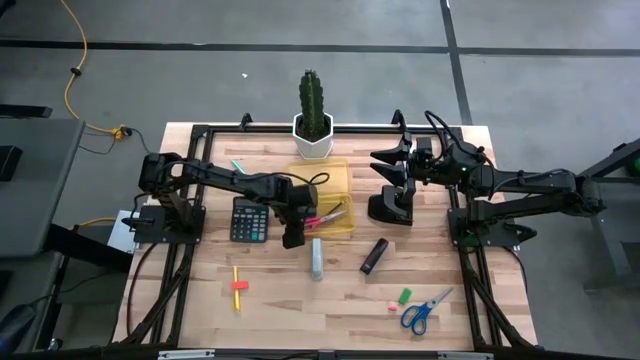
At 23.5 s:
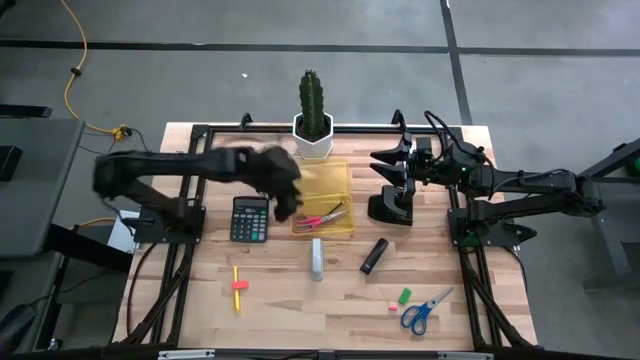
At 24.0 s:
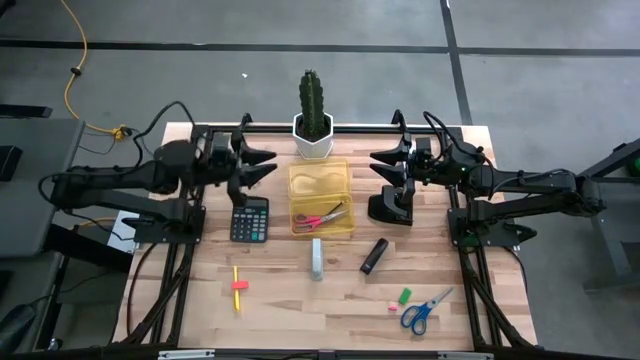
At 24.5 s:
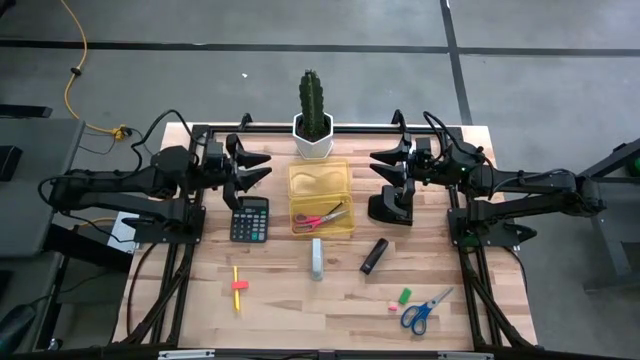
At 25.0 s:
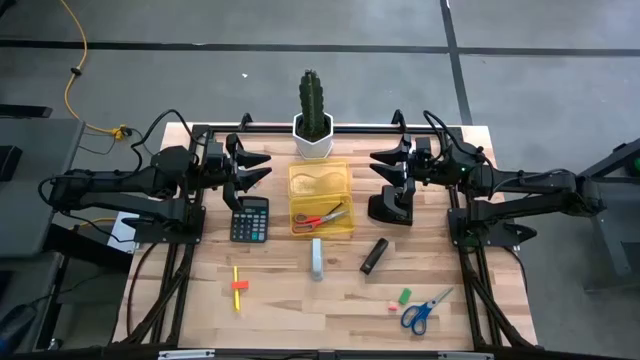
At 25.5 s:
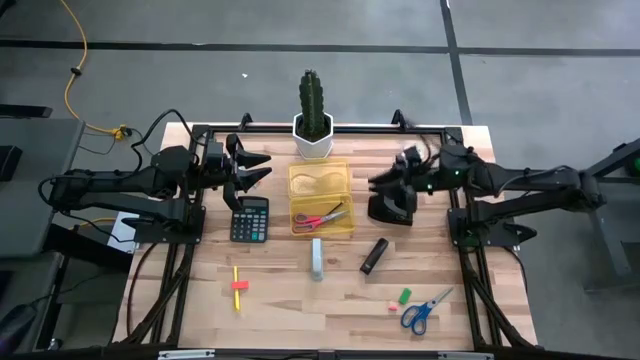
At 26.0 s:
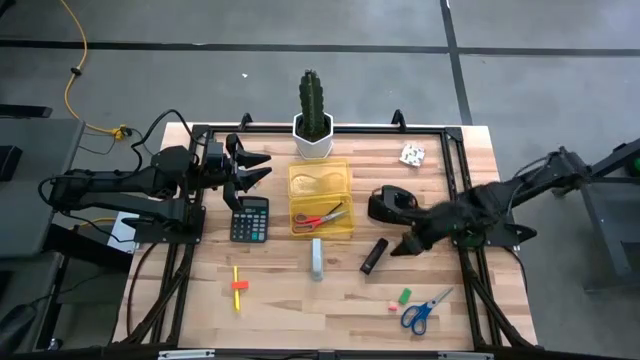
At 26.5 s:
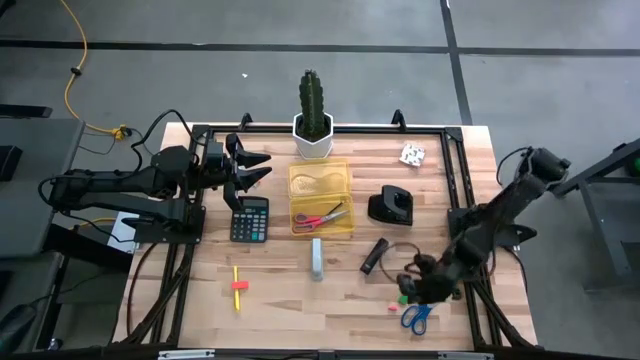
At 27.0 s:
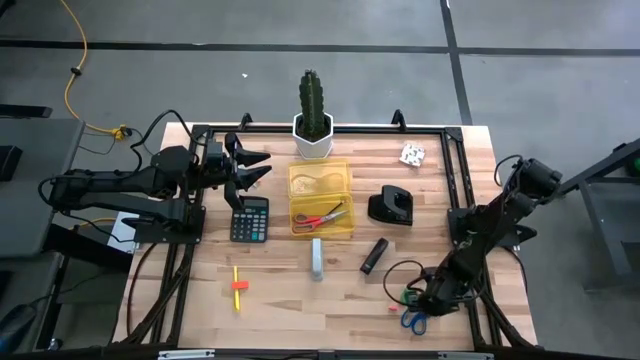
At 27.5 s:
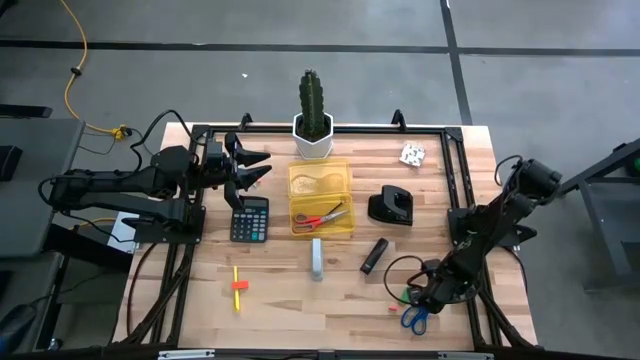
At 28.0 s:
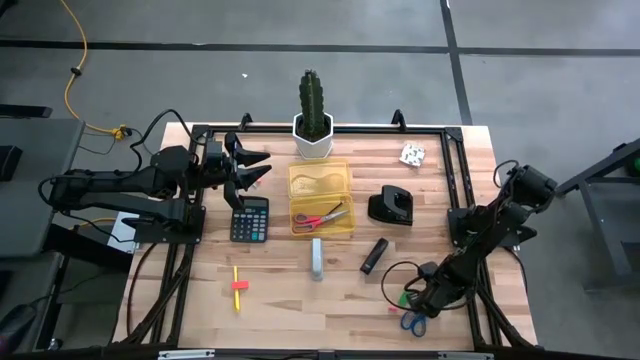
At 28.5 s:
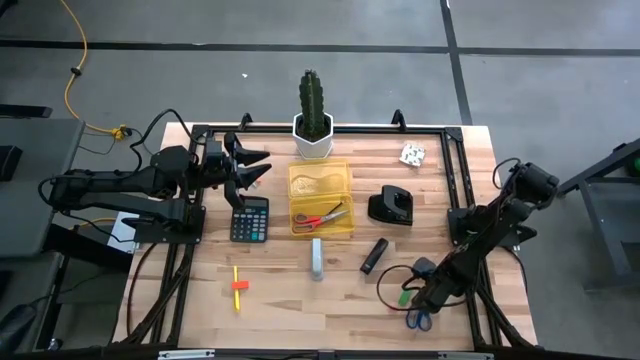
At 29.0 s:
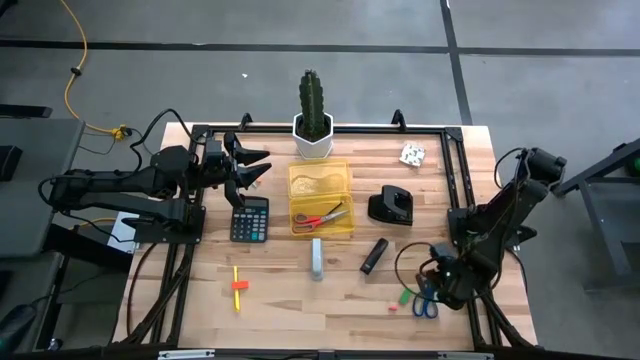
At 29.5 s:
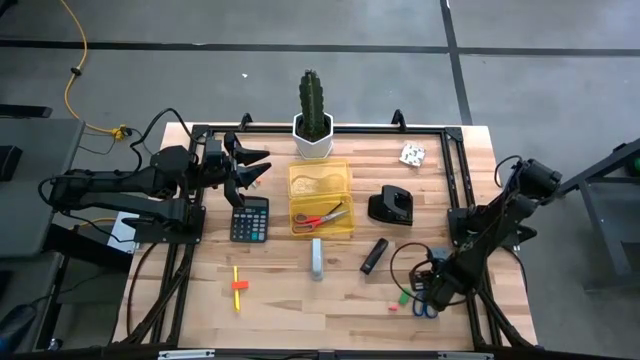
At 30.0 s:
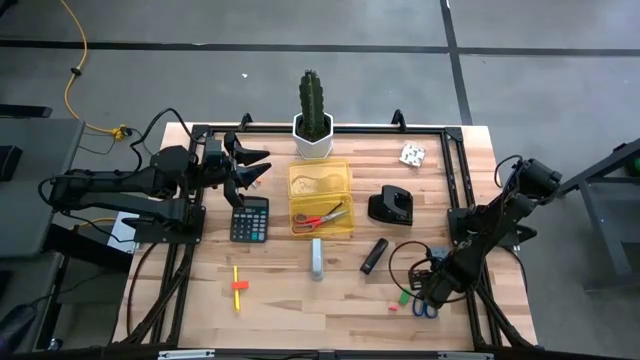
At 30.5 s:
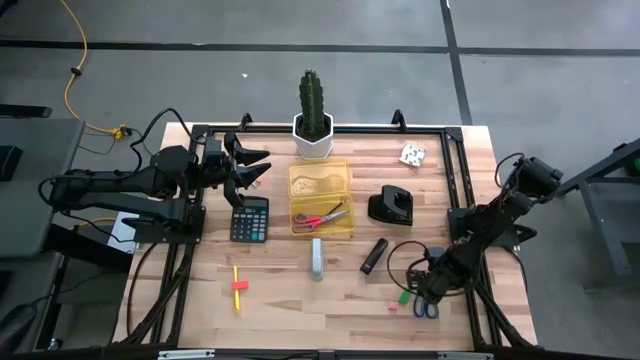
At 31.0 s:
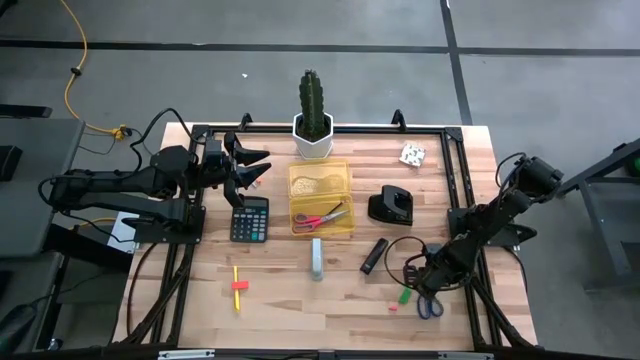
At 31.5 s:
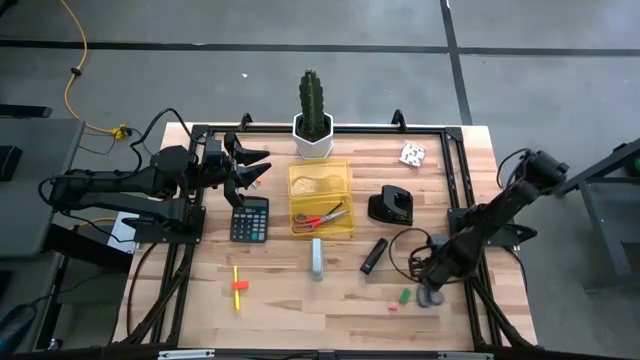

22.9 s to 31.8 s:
Task: Pick & place school supplies into a supply box
Put the blue scissors into the yellow supply box

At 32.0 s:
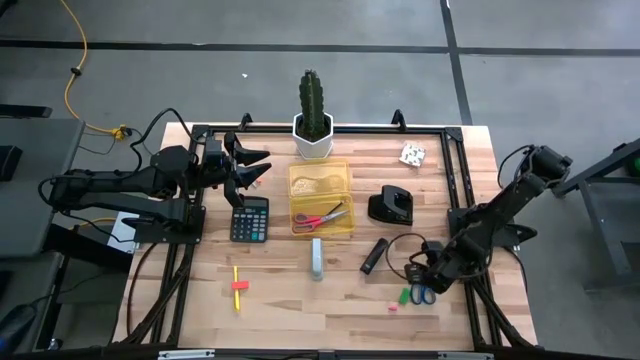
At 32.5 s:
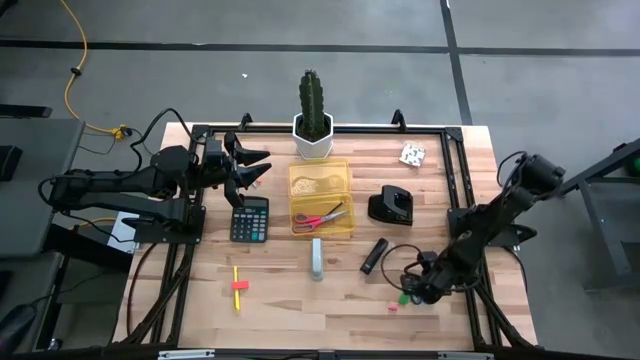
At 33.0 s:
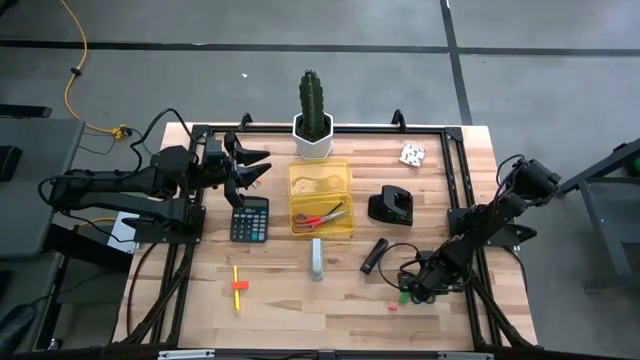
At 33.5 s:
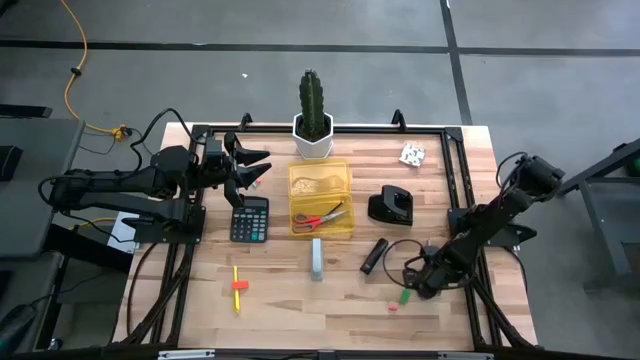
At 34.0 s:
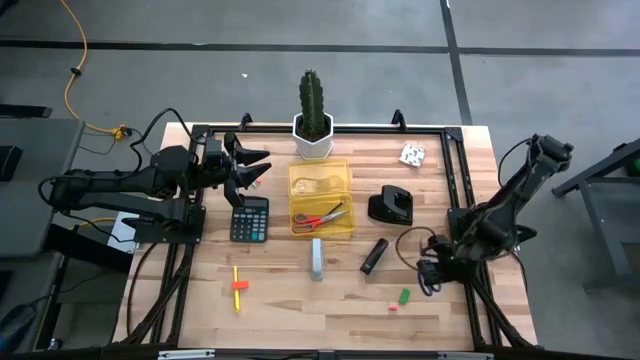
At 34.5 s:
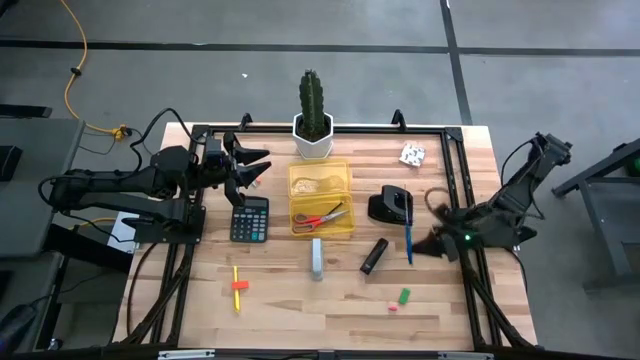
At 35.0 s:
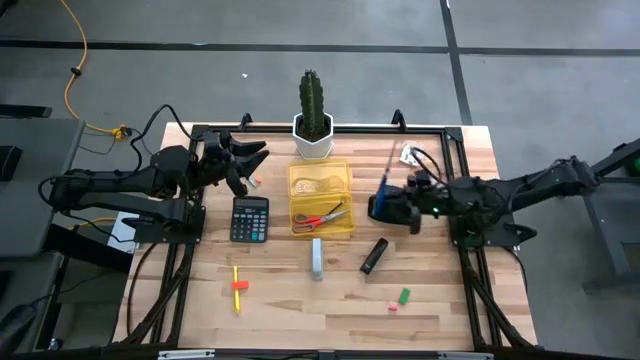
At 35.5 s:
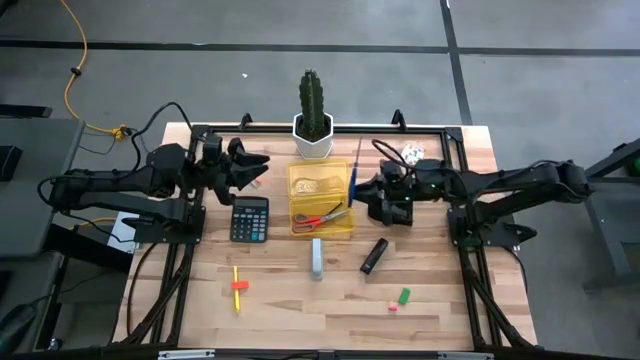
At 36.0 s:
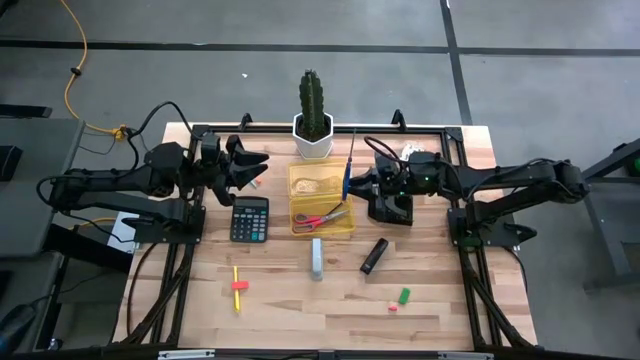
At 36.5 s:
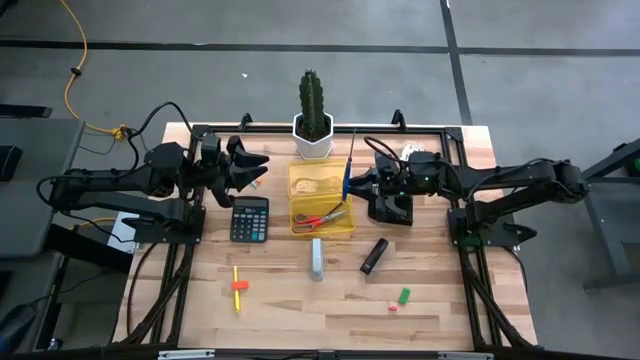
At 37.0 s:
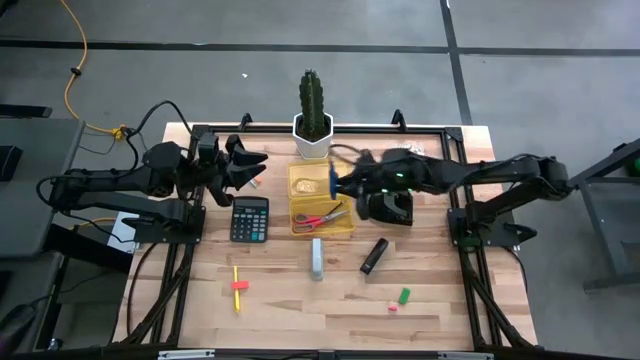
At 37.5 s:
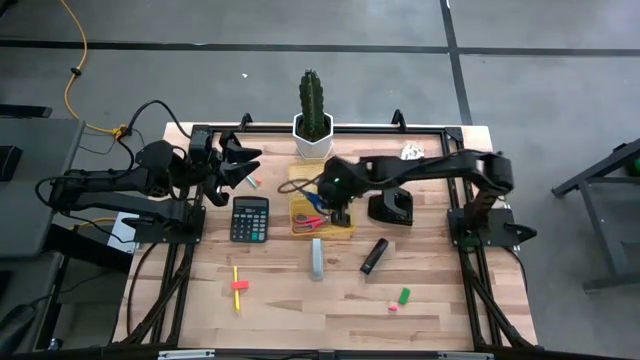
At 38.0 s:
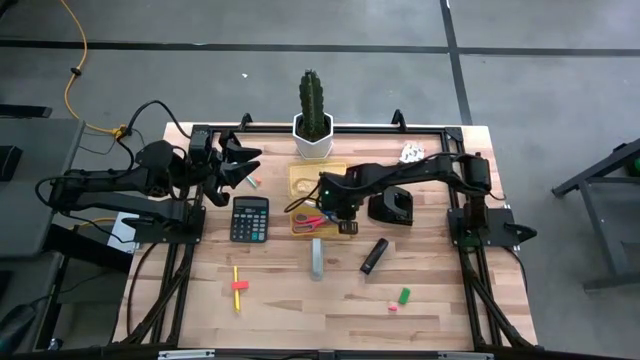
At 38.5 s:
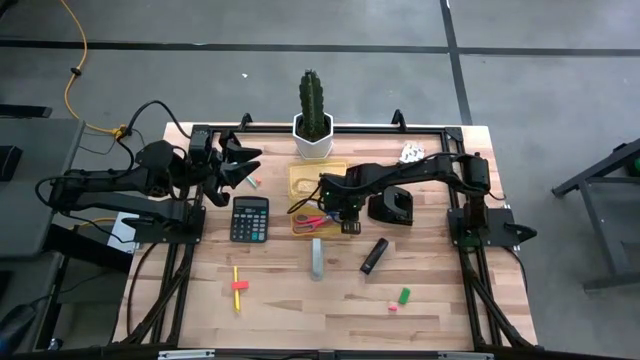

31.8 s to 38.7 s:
Put the blue scissors into the yellow supply box

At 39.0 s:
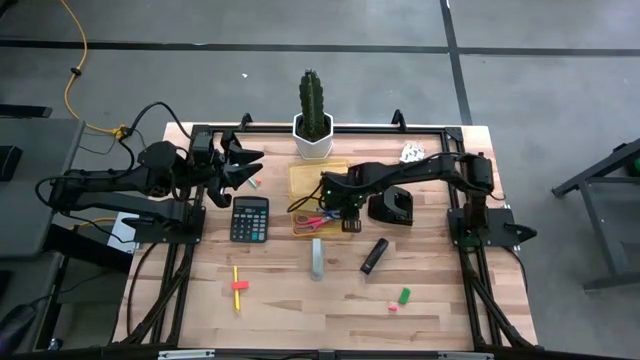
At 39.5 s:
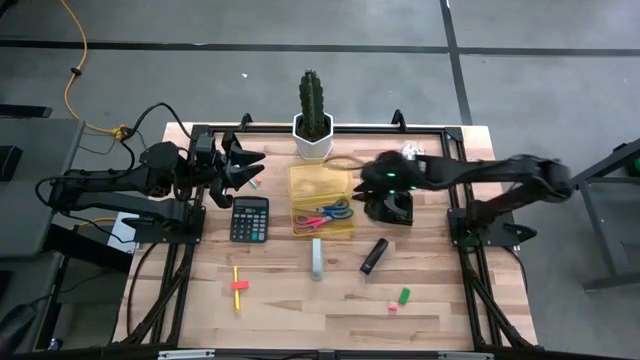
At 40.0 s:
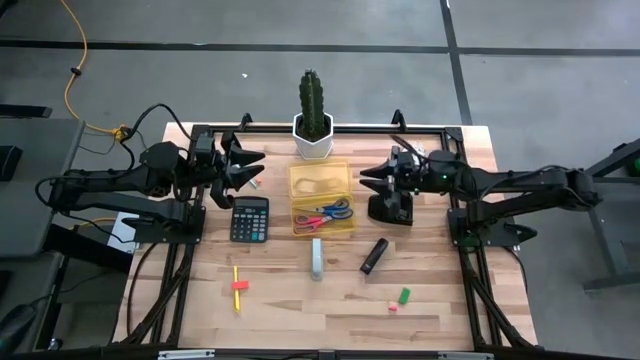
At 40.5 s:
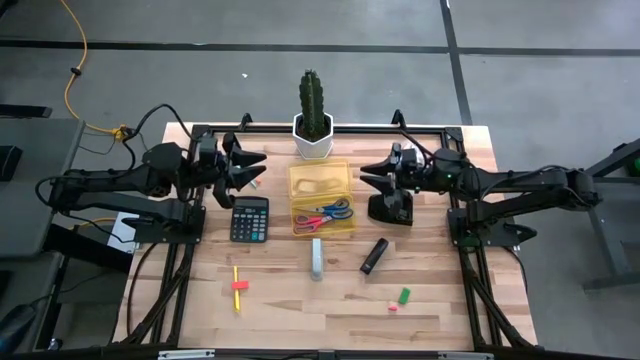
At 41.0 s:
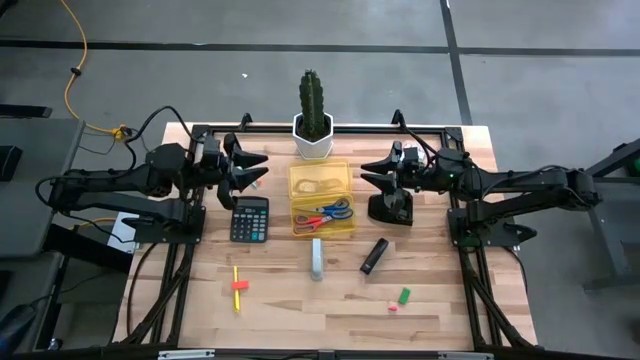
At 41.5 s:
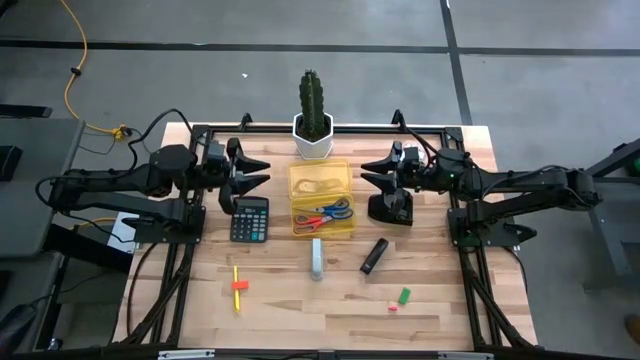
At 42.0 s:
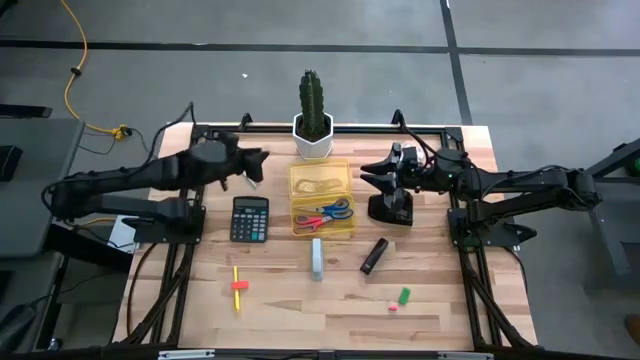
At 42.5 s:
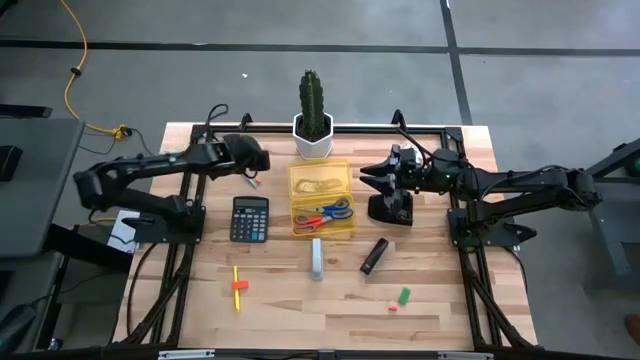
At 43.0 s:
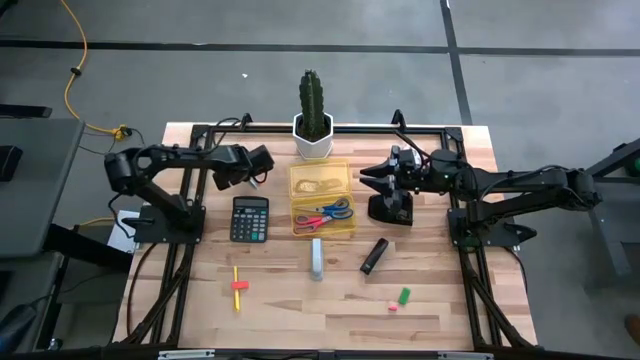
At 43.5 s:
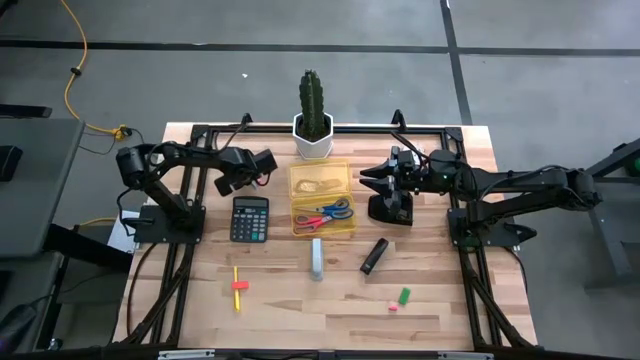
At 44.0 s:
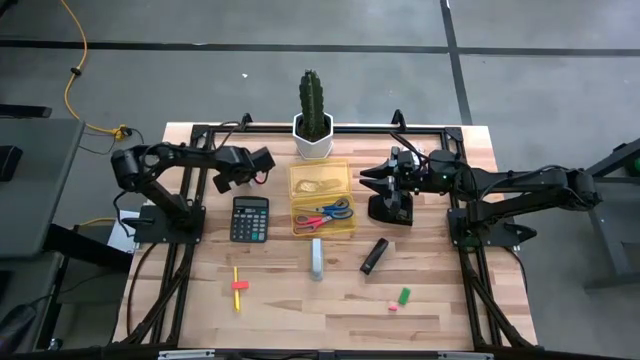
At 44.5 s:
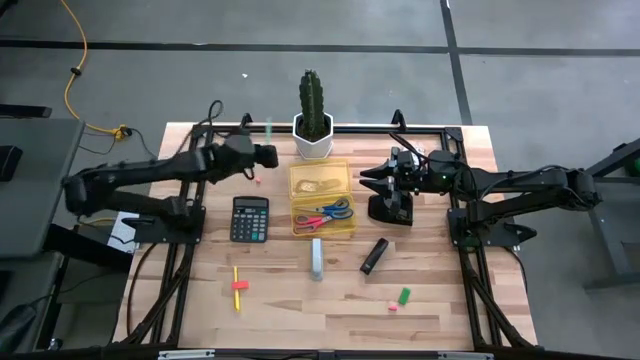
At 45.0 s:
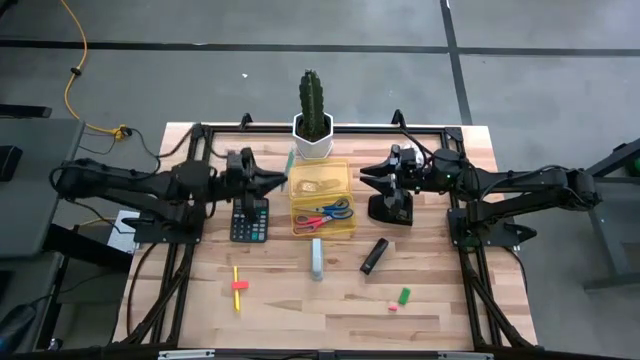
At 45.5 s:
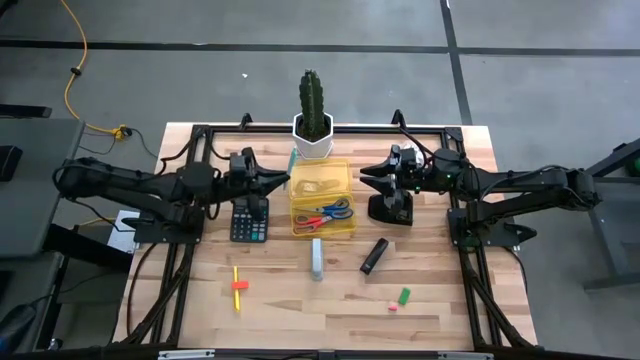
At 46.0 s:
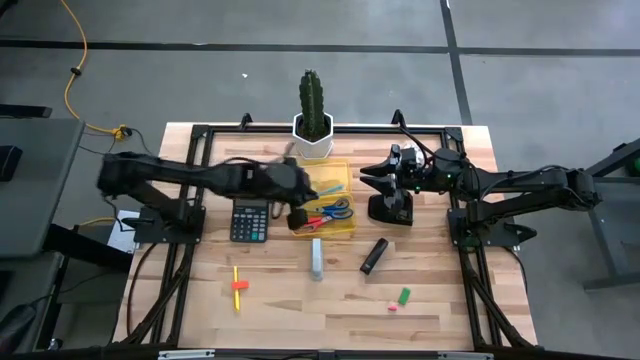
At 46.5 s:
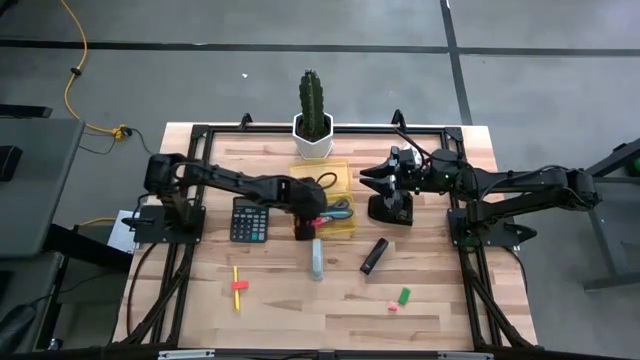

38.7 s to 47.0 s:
Put the light blue pen into the yellow supply box
